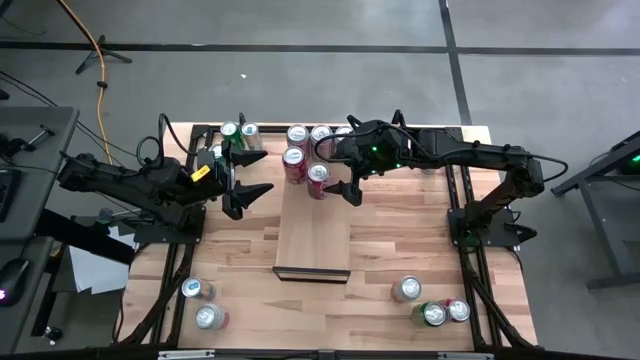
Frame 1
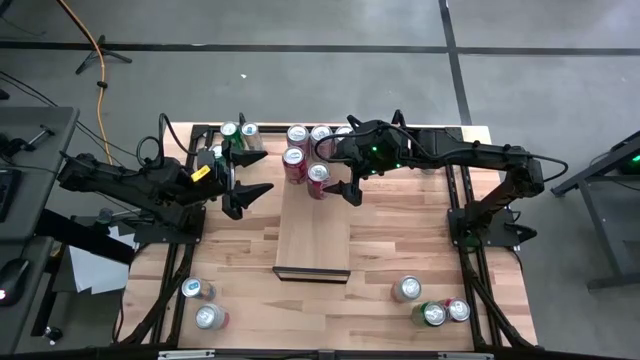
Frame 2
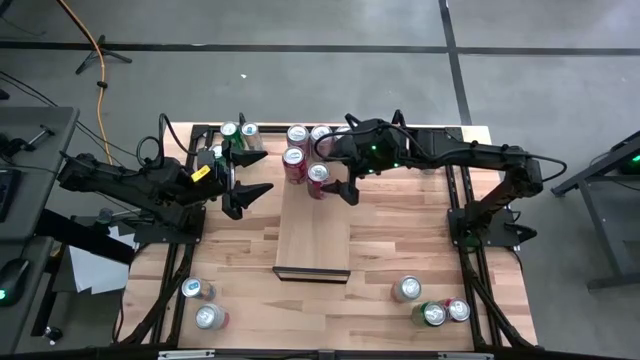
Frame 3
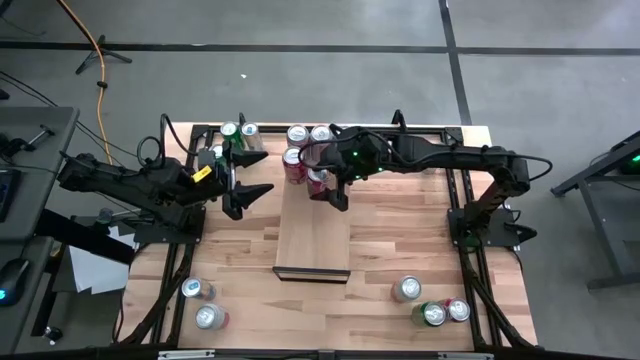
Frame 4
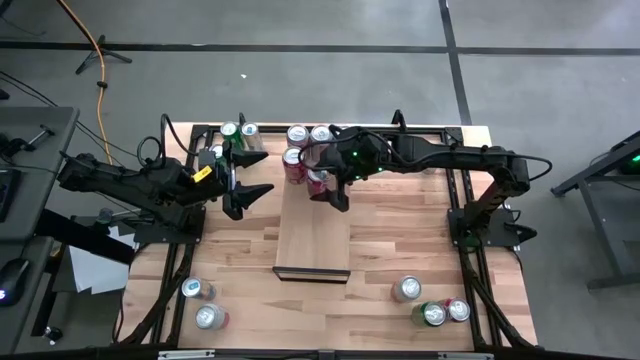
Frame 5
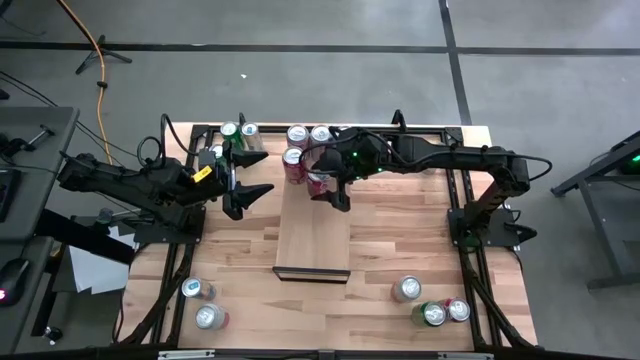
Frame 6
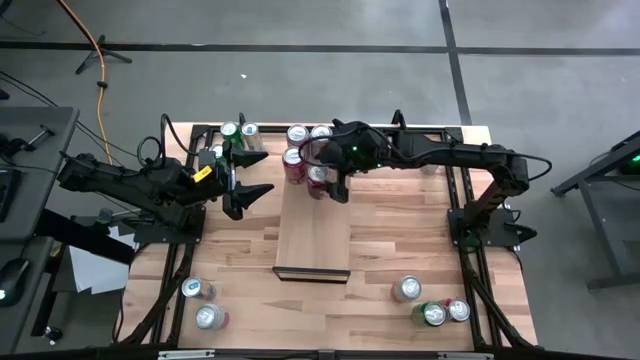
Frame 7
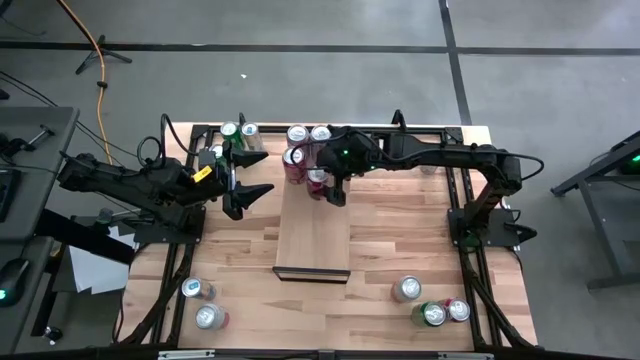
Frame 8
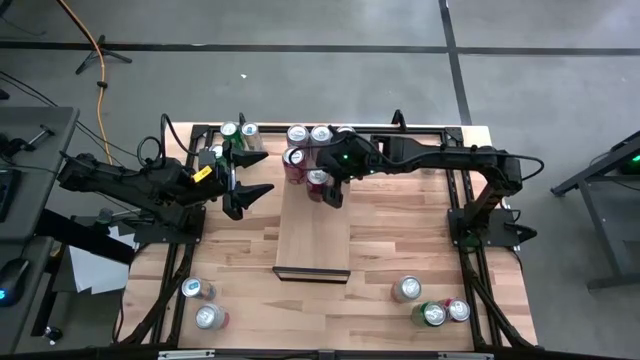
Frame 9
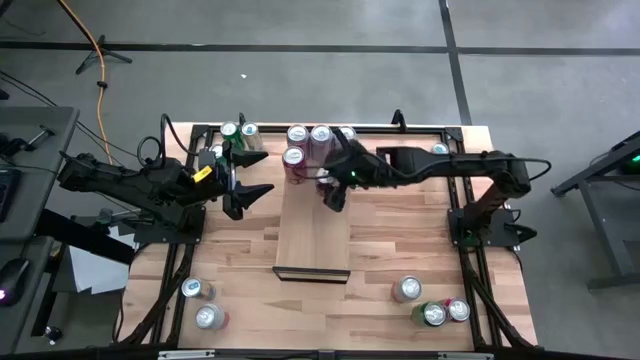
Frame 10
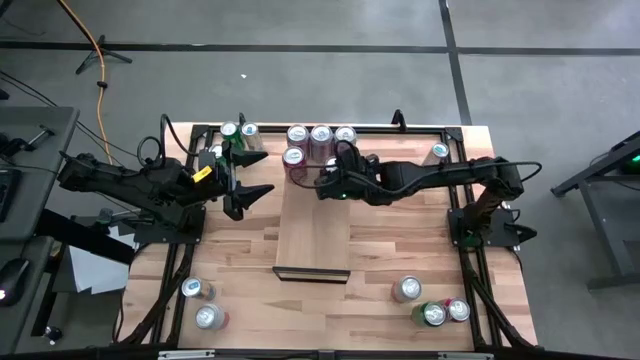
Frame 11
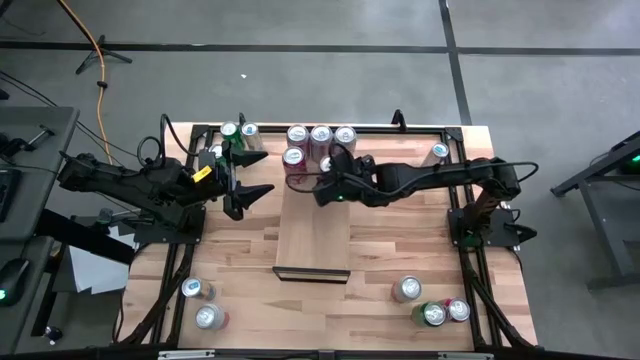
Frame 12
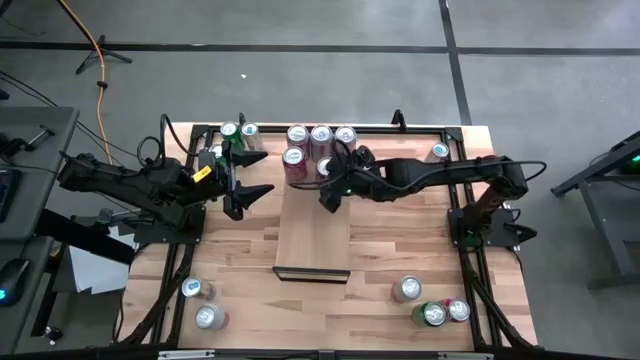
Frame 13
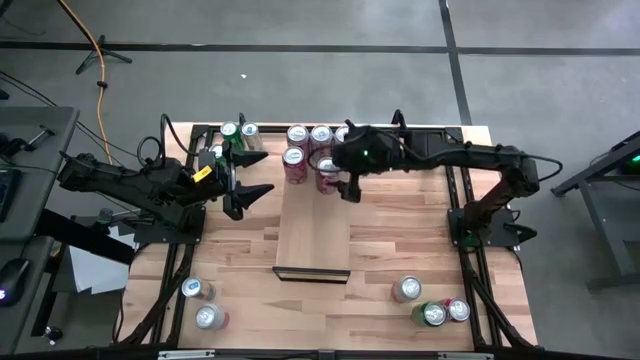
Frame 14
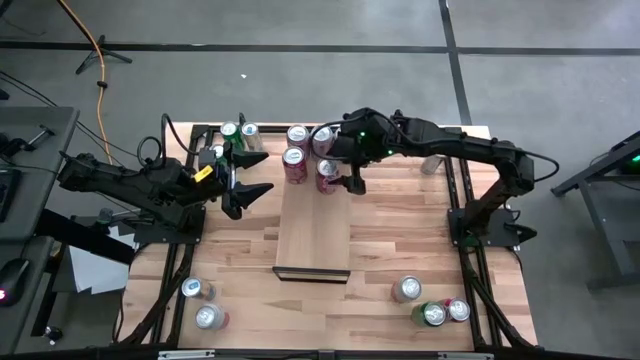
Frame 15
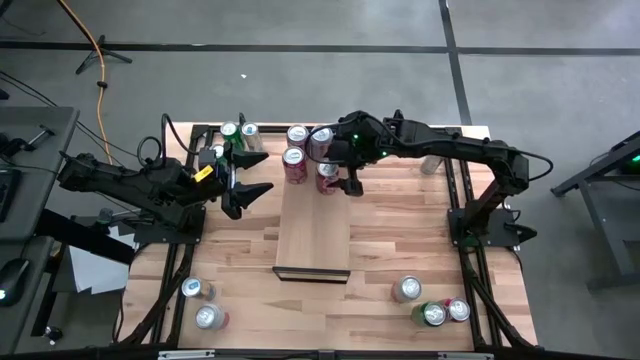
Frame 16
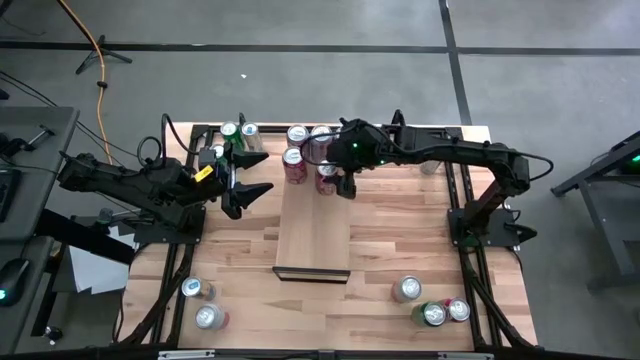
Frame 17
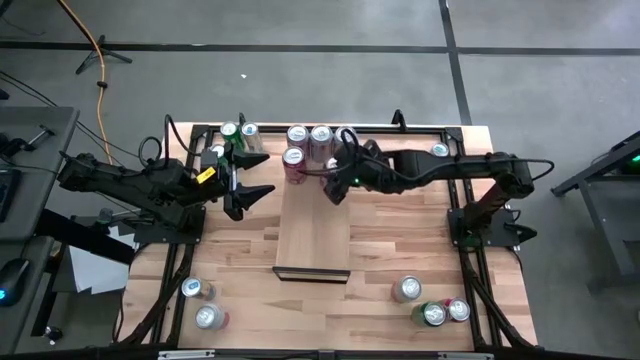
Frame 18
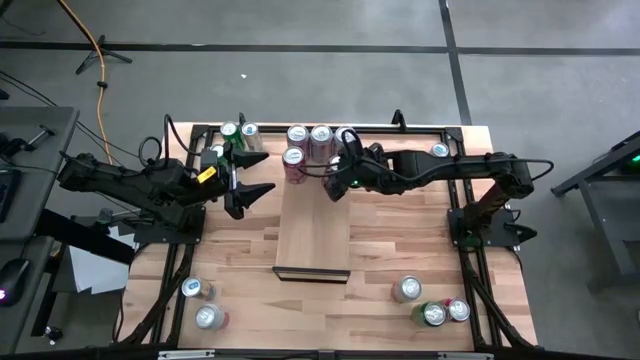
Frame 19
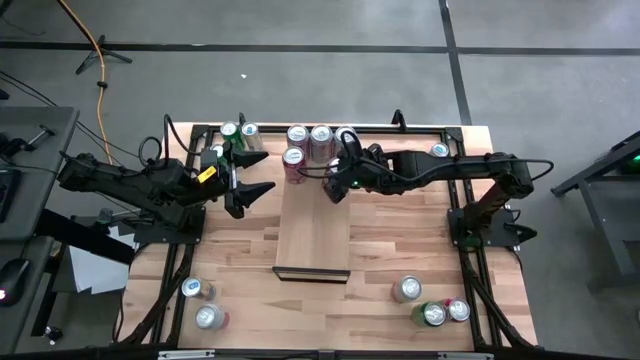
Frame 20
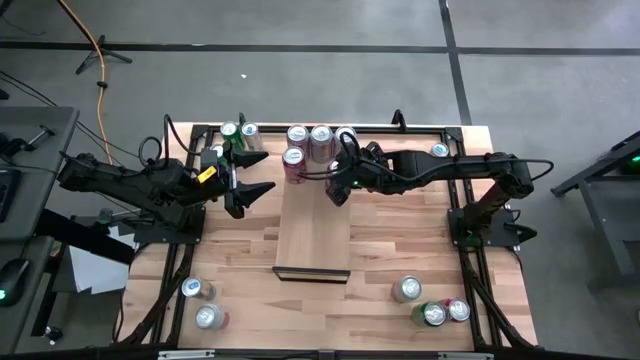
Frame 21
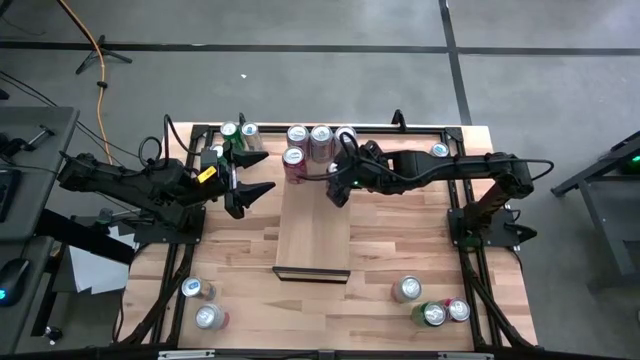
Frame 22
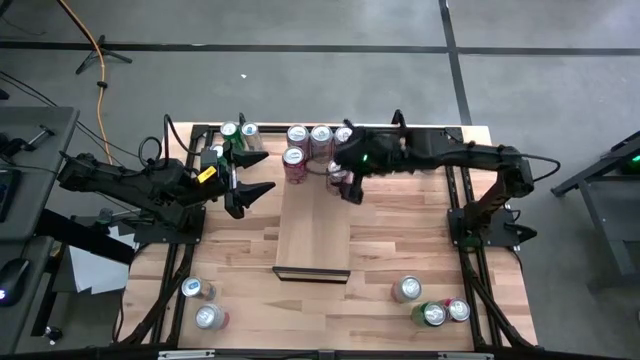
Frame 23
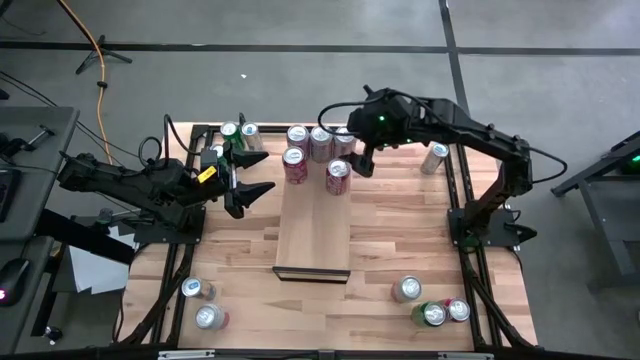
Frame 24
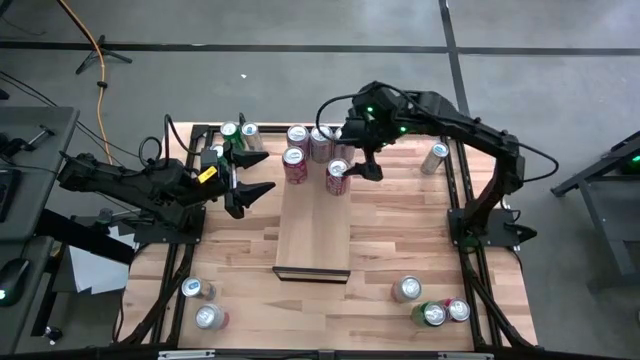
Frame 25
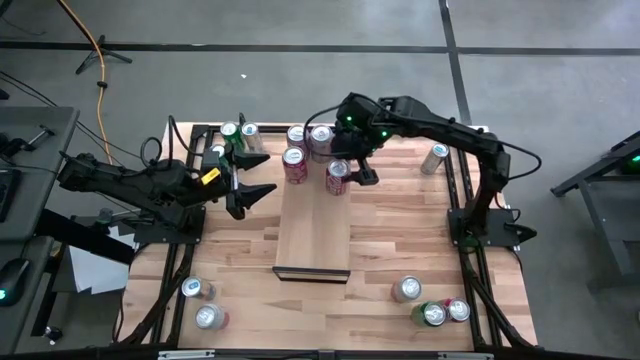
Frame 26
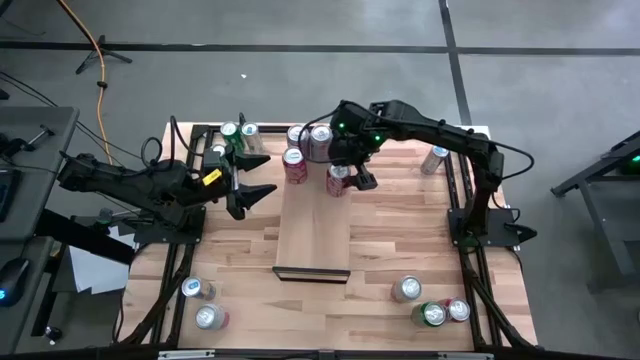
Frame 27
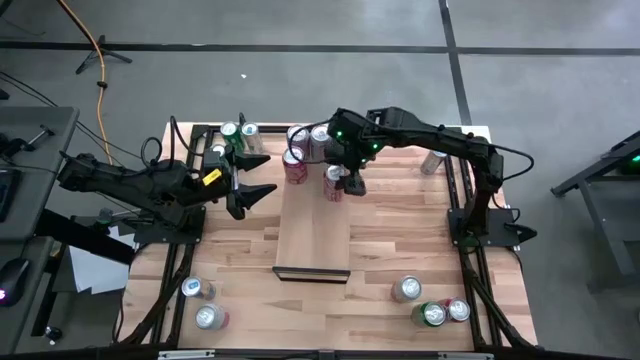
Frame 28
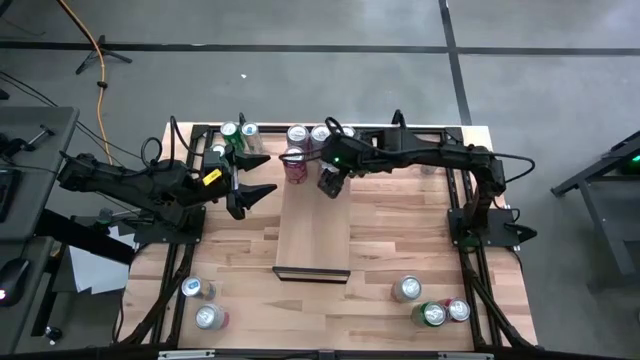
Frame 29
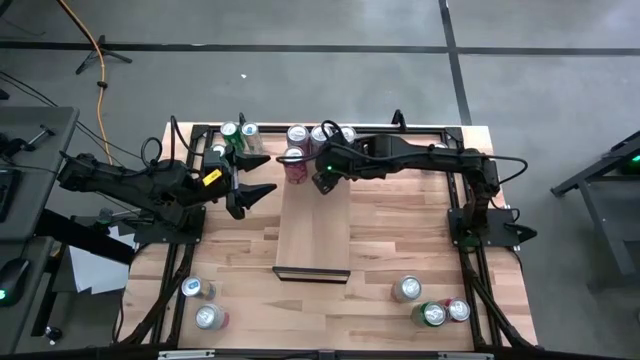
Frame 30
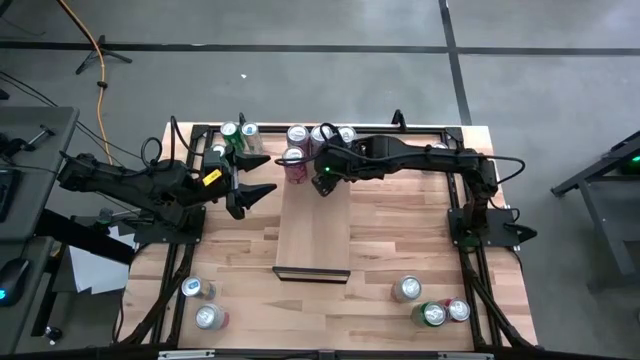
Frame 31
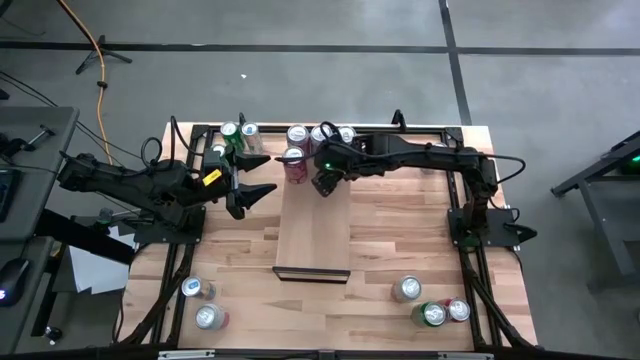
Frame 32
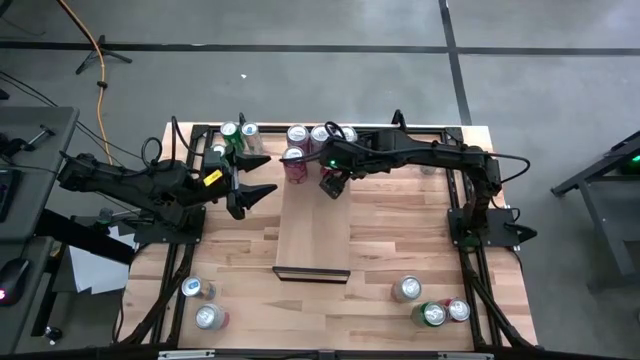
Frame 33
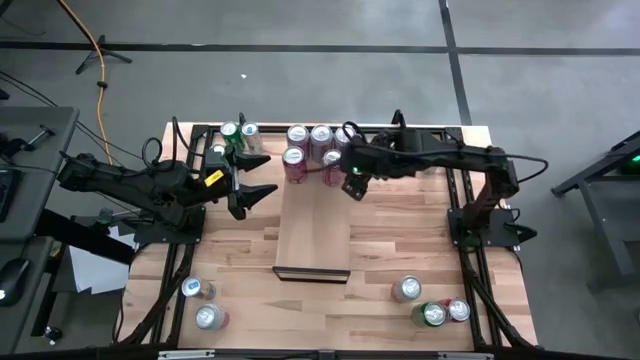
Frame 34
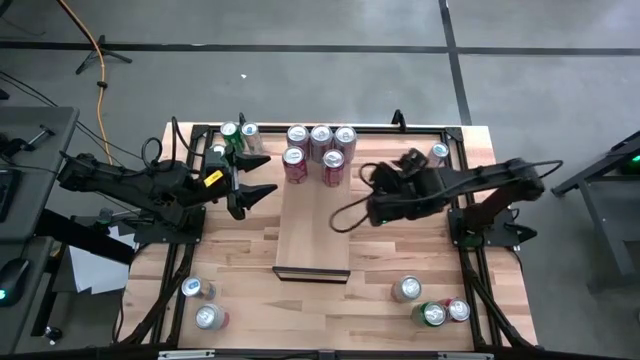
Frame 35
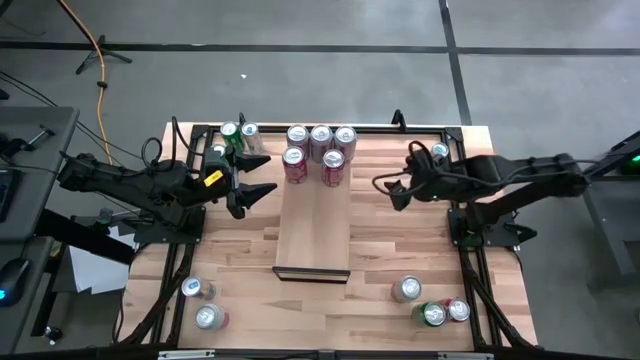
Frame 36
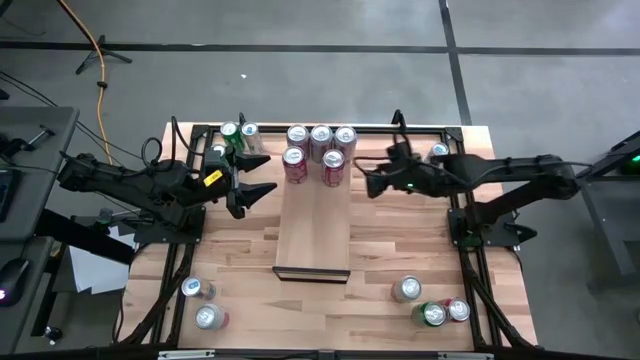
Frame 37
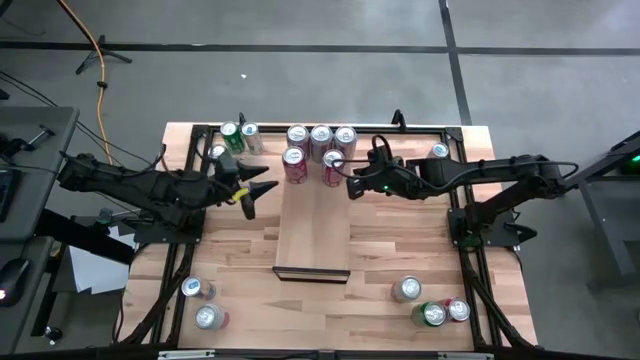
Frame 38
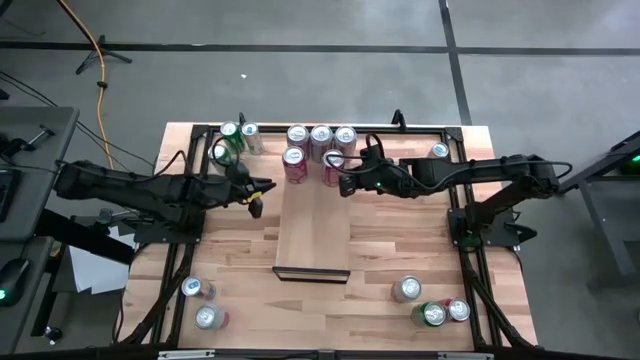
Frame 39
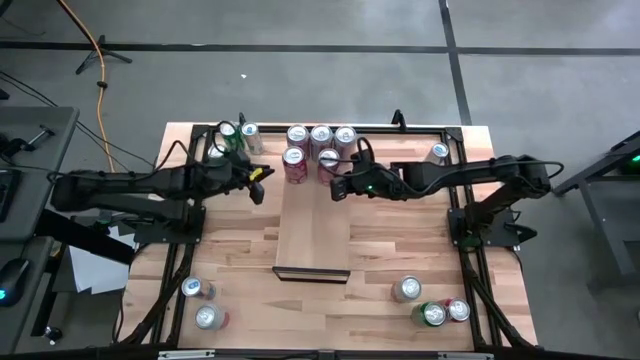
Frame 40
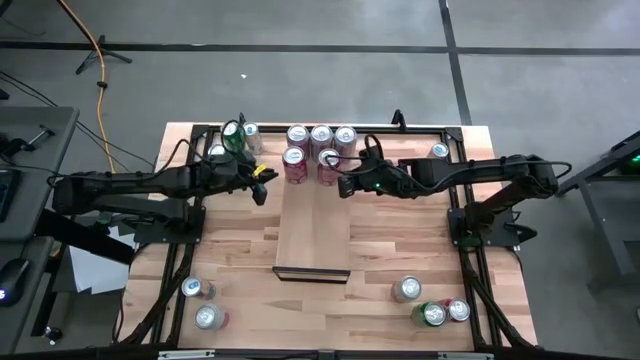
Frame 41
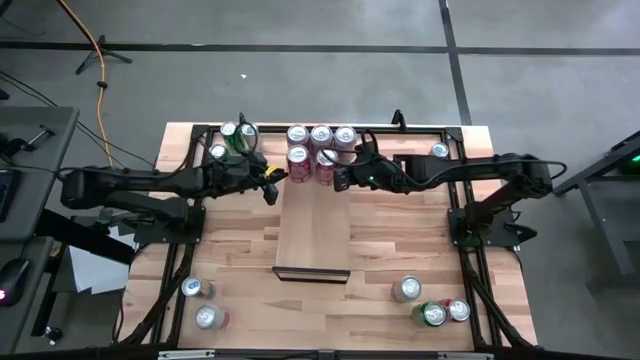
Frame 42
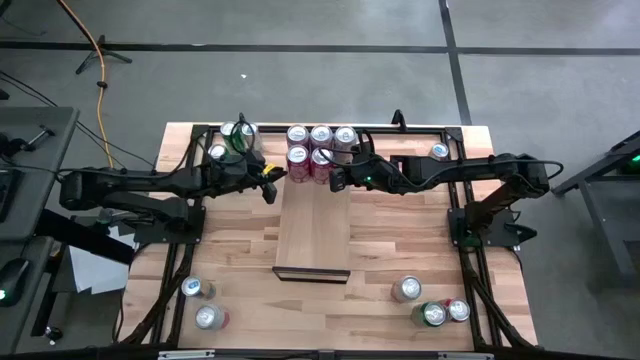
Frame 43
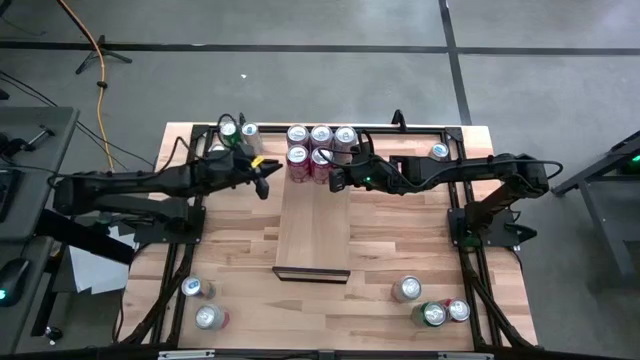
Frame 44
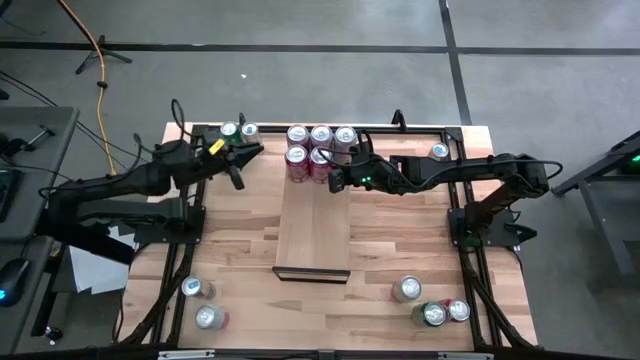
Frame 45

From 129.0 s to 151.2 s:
Task: Place canned beverage on shelf
Put the top red soda can on the shelf
